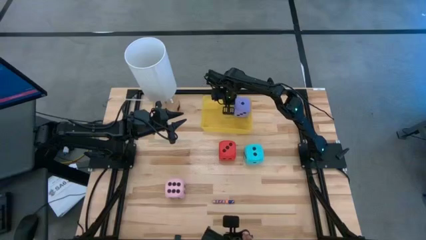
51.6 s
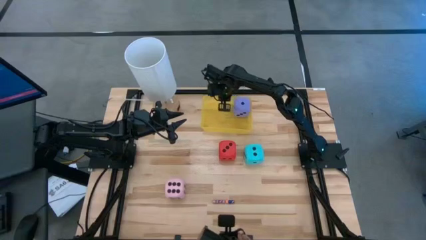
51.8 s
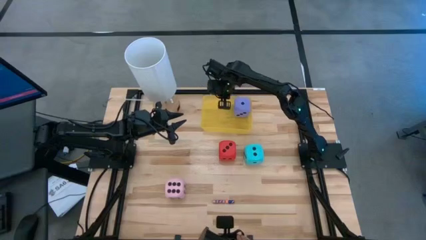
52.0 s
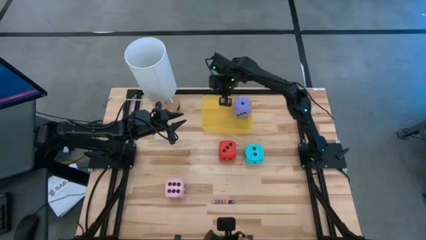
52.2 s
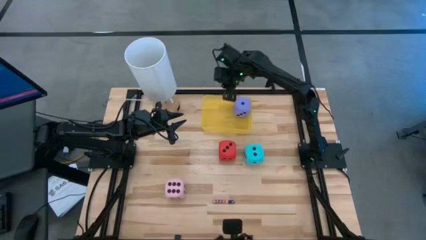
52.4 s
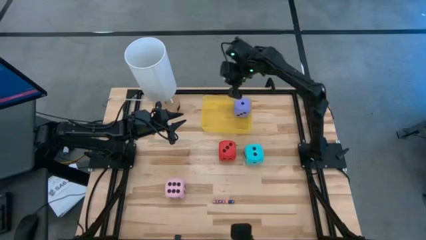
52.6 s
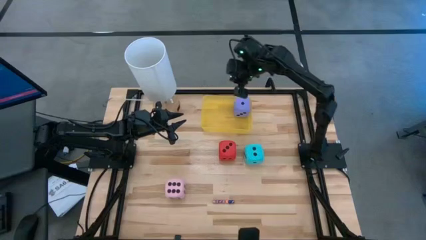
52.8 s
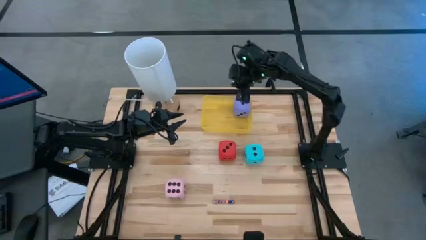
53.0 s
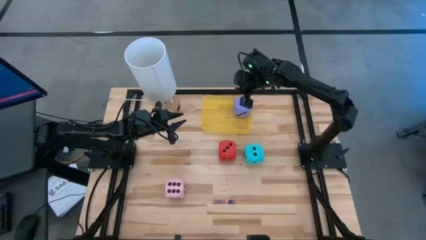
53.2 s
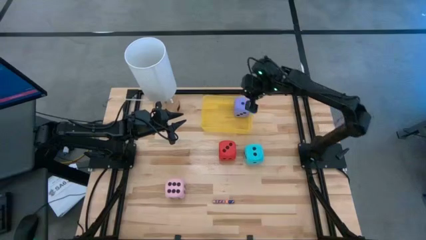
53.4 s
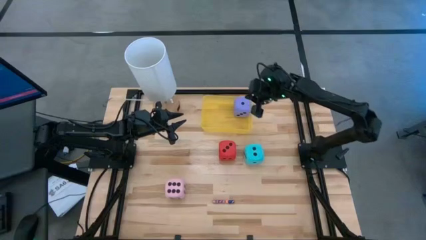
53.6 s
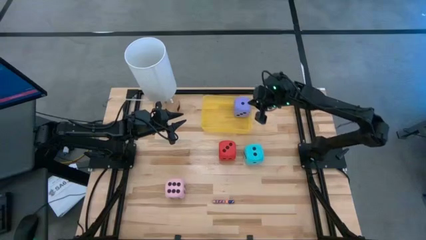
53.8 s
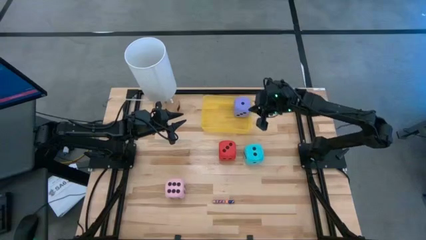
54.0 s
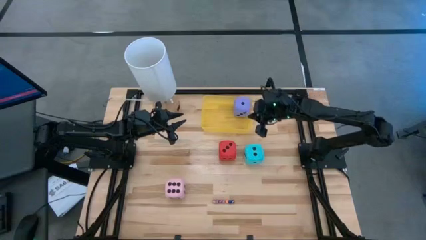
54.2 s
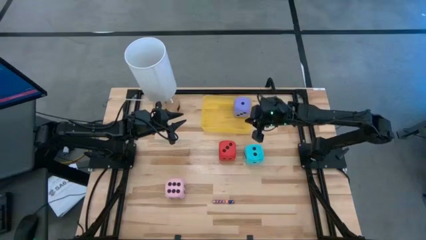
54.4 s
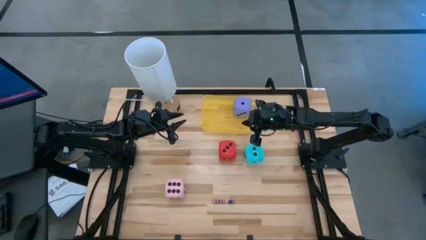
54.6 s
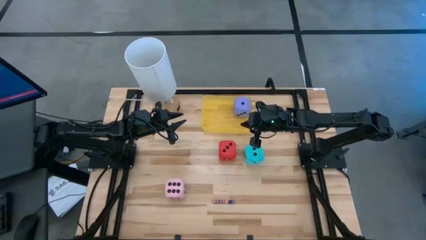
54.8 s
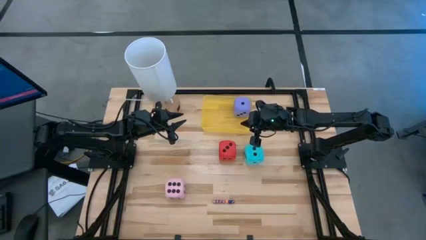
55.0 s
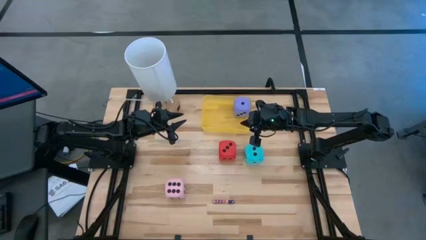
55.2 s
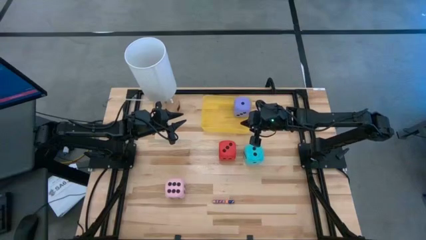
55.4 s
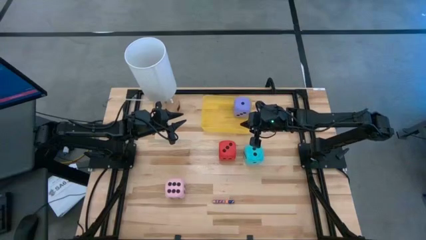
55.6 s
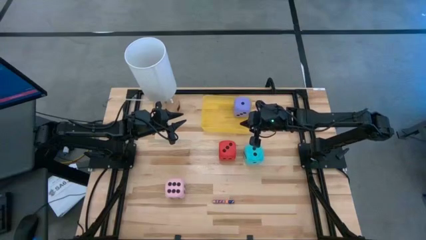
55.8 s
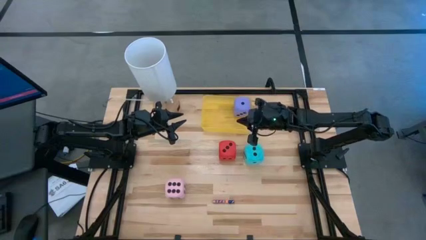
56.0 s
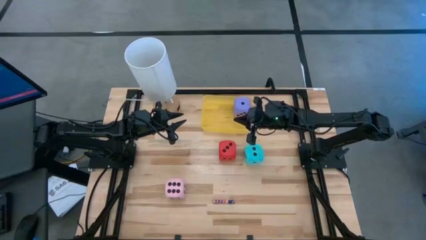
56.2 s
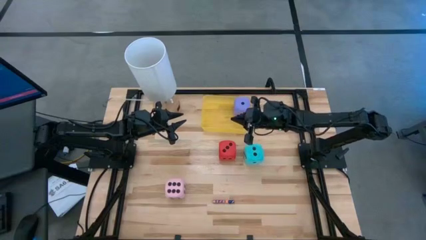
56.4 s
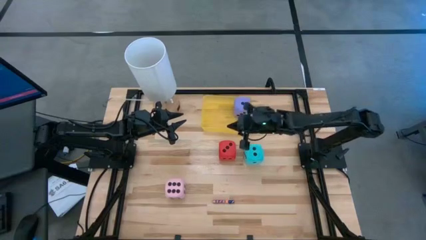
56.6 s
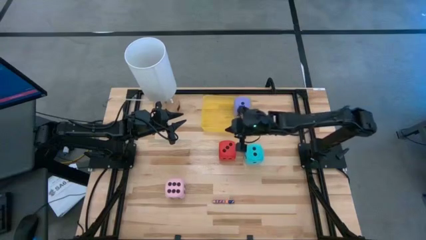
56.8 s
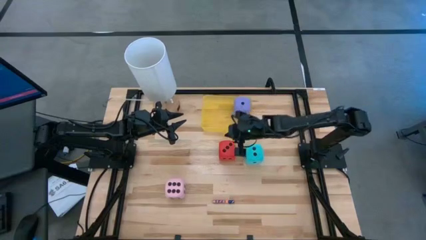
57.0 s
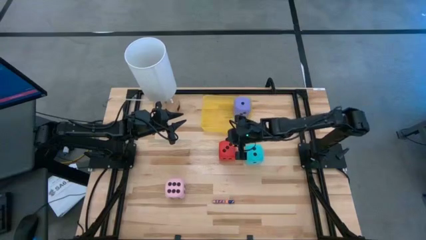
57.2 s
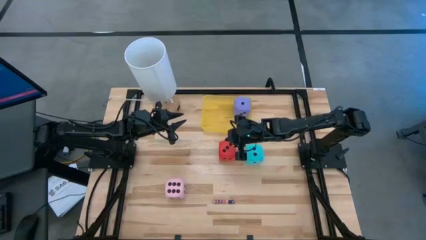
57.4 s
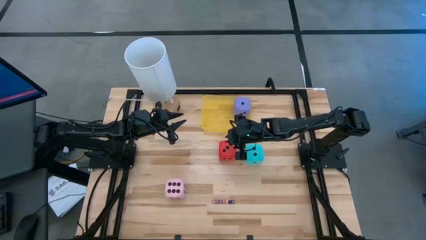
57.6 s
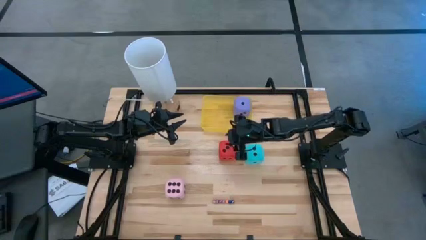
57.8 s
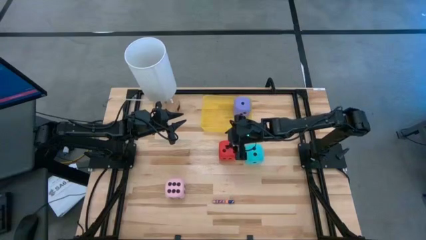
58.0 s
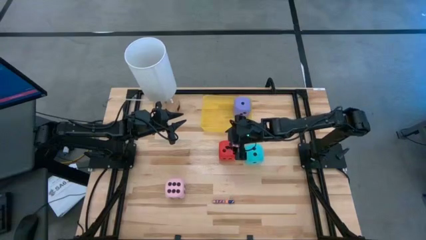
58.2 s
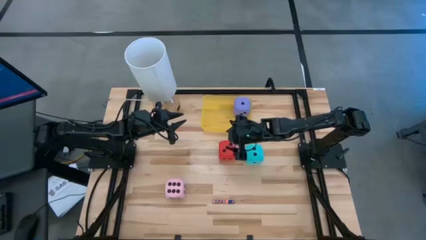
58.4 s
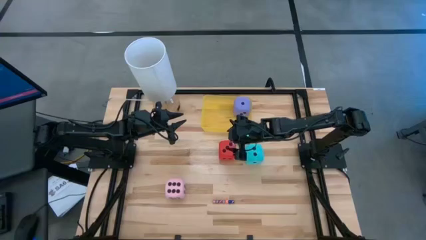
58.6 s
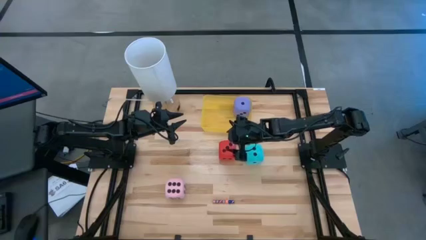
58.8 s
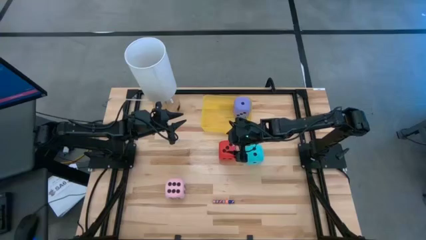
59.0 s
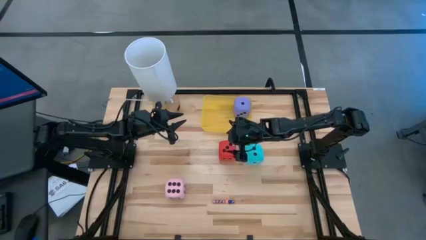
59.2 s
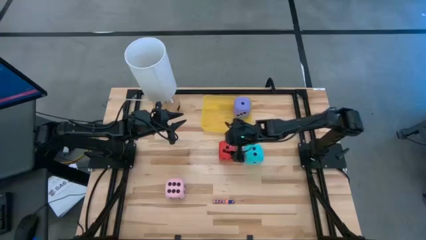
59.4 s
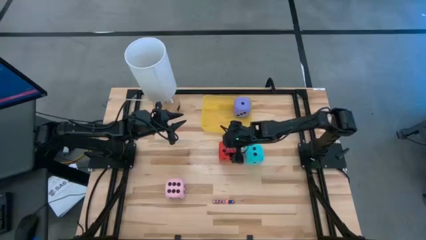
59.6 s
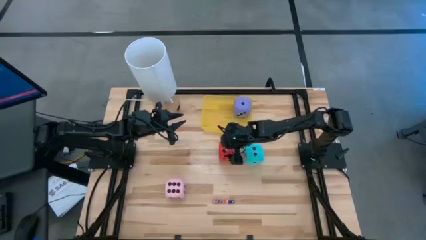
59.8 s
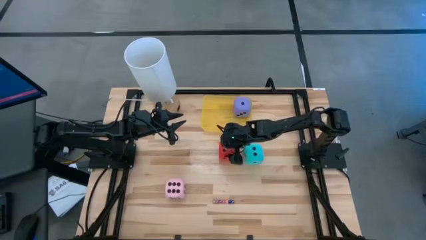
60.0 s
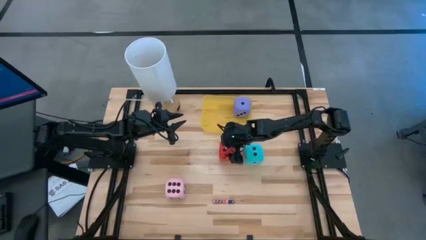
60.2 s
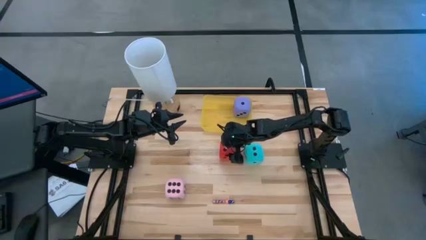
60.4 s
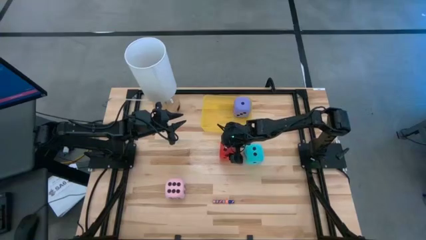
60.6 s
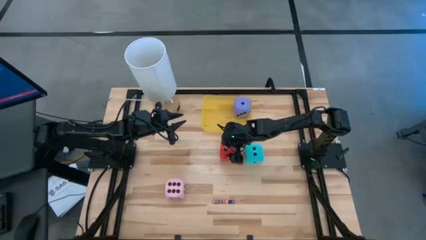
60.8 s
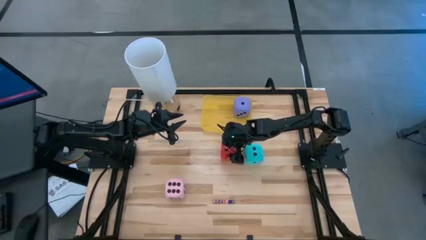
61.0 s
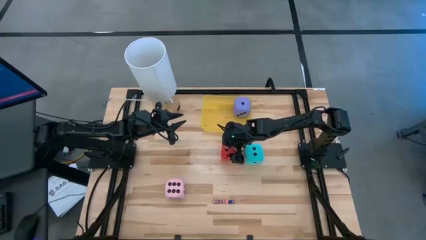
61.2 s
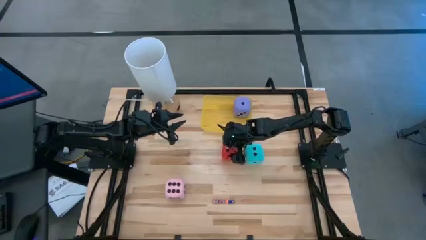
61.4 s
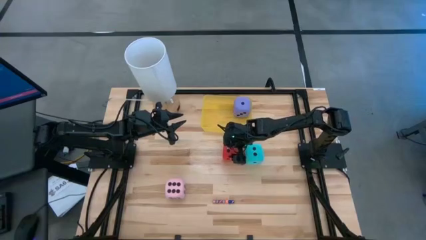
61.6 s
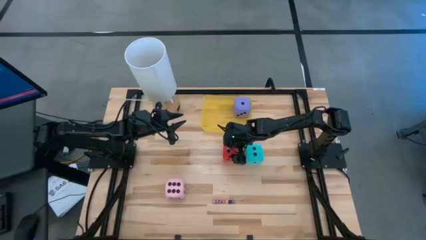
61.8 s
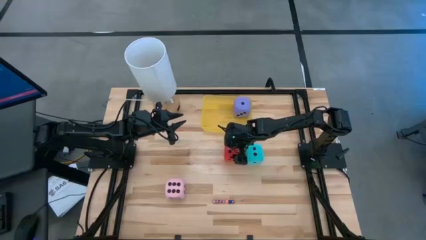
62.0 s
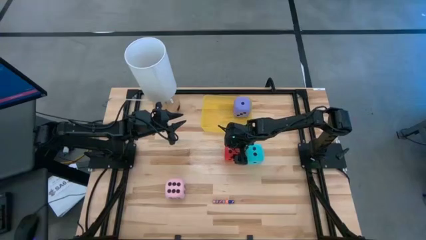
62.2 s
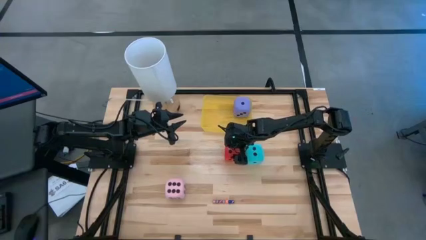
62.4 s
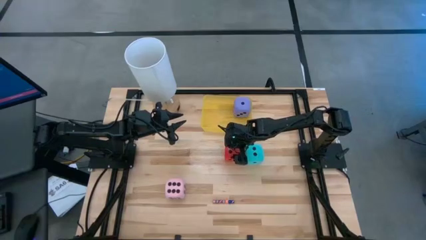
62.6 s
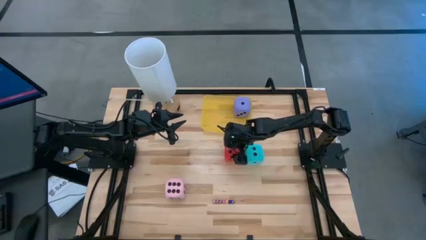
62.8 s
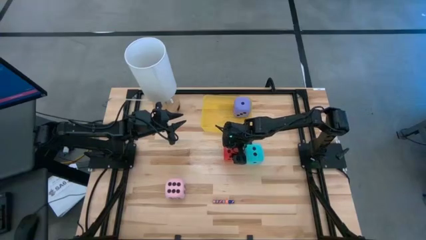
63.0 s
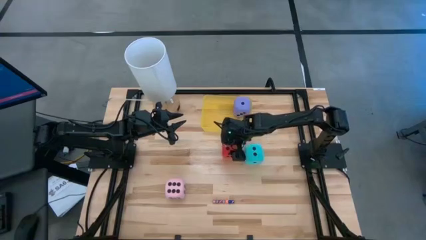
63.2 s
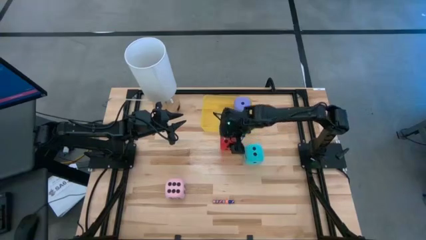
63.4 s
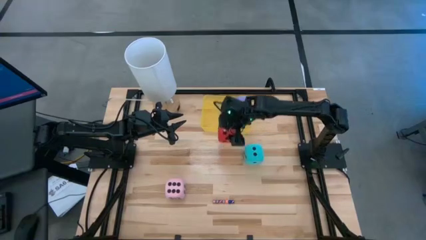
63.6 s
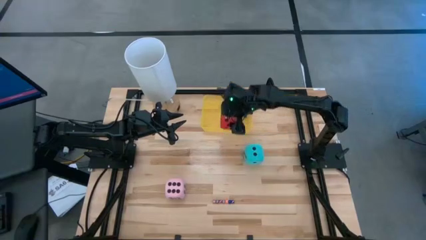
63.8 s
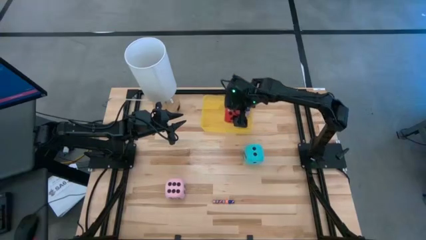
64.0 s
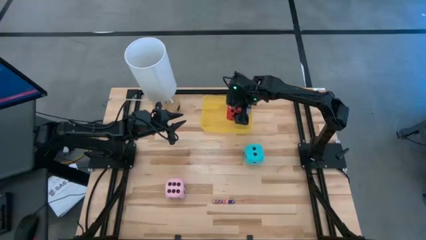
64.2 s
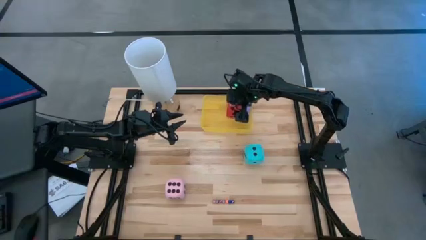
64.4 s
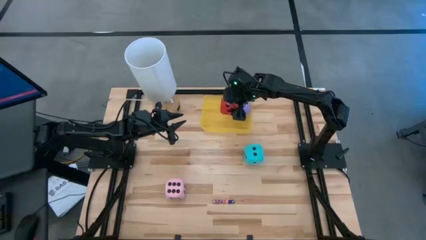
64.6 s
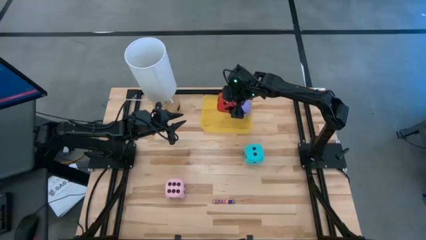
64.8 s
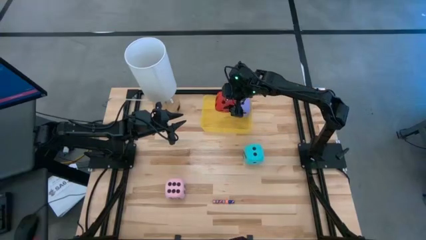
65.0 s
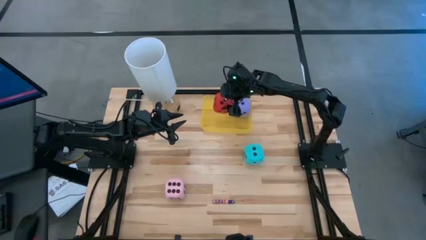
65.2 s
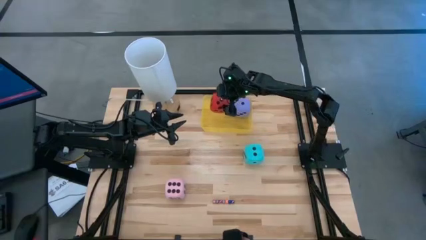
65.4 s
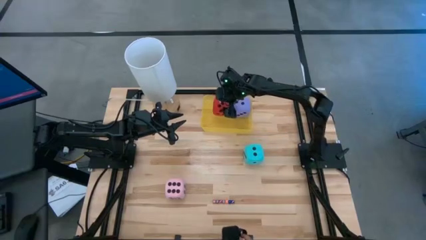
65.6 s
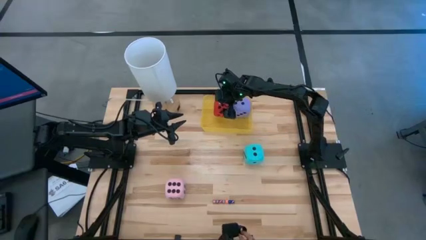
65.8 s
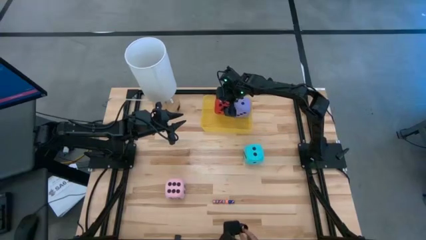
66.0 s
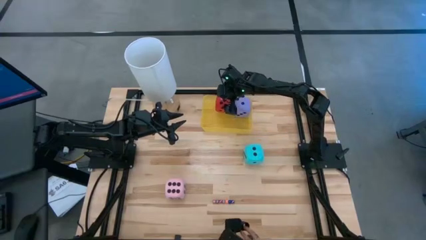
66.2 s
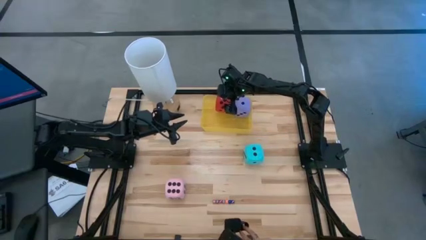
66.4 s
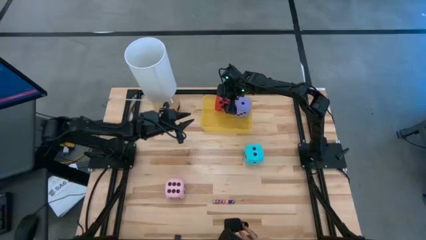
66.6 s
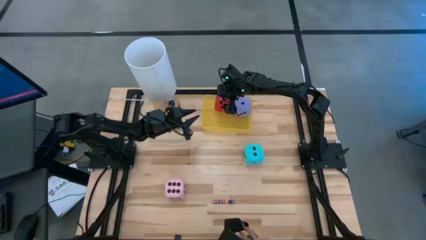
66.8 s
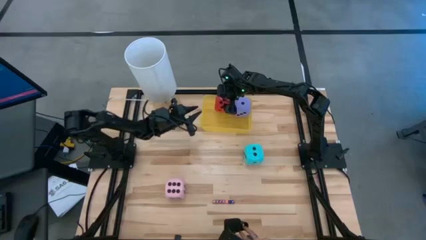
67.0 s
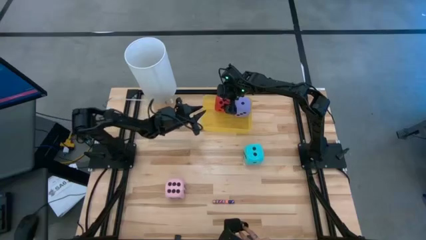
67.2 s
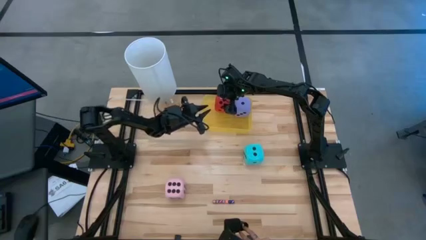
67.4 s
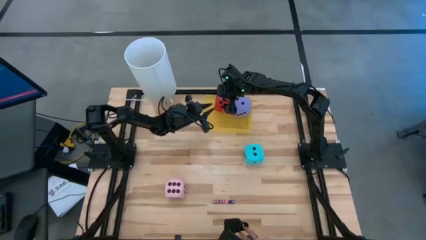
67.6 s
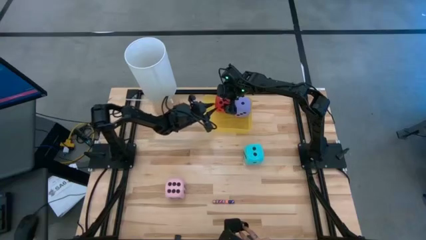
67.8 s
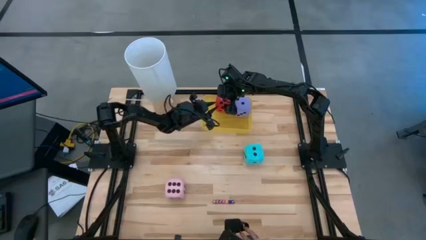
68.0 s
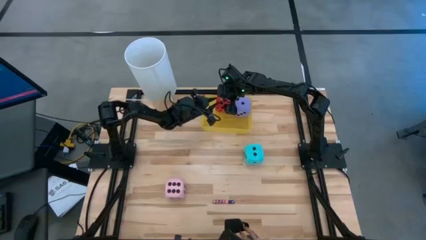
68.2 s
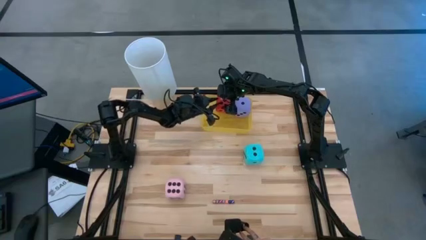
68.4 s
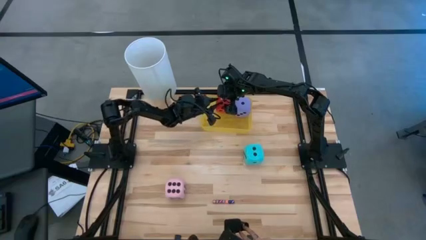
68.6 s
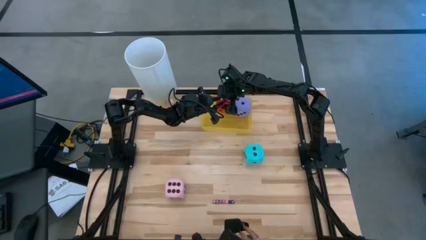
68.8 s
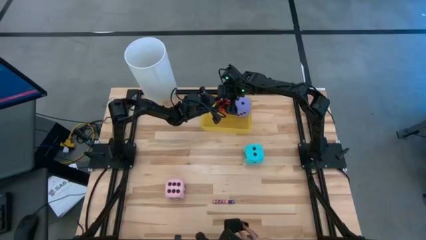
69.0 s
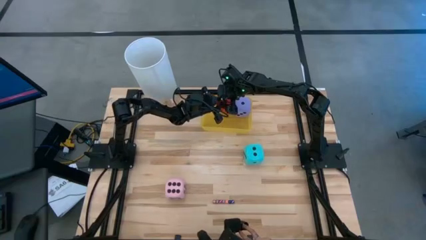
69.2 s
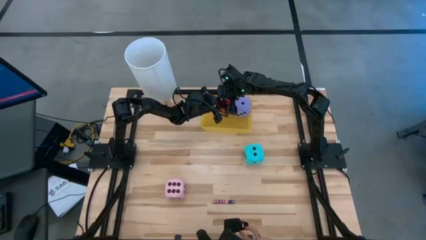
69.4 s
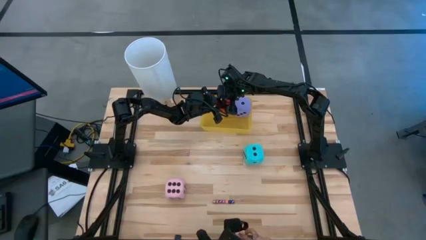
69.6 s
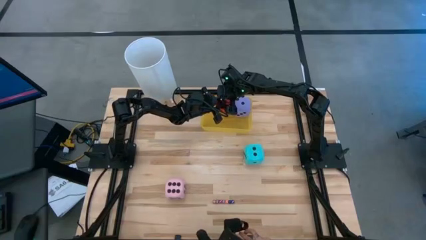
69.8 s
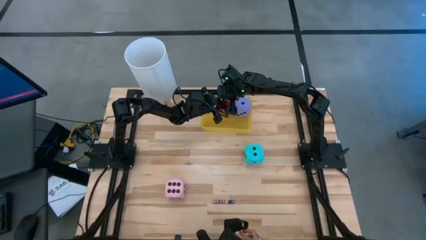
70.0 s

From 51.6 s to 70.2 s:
Task: Pick & Place Dice
Put the big red dice into the yellow bin
